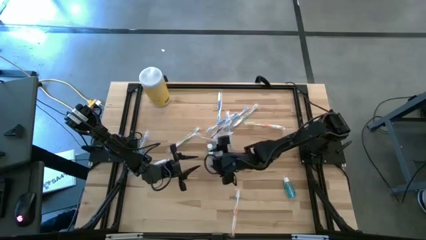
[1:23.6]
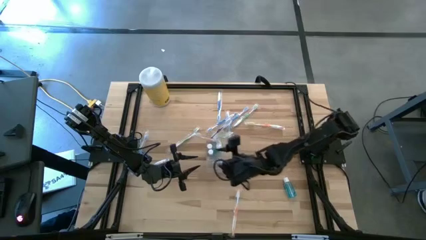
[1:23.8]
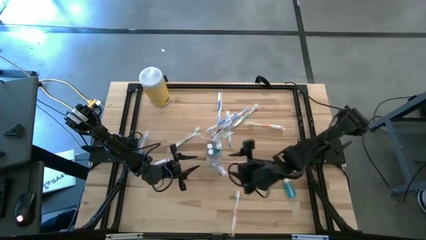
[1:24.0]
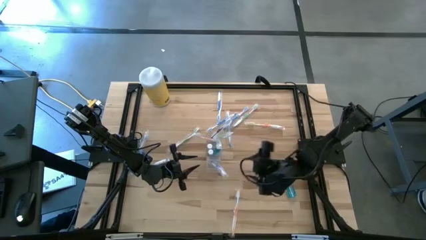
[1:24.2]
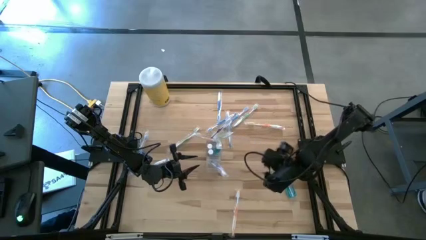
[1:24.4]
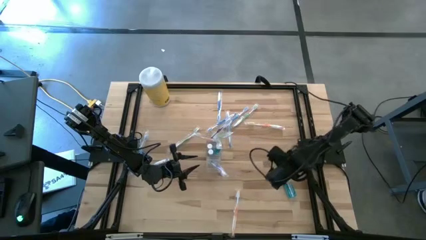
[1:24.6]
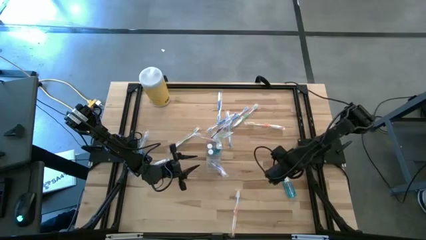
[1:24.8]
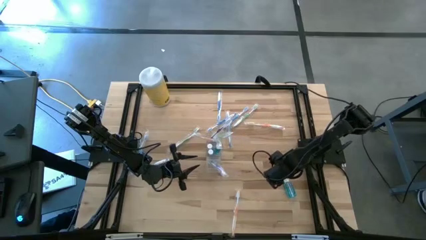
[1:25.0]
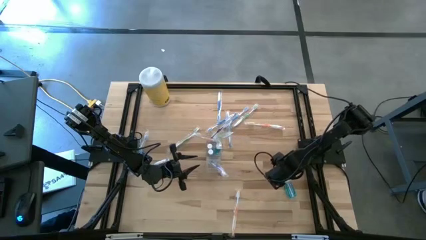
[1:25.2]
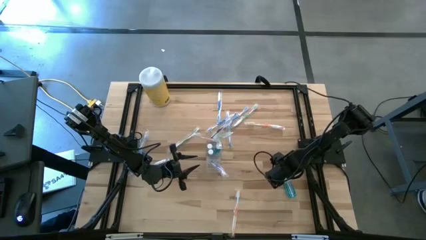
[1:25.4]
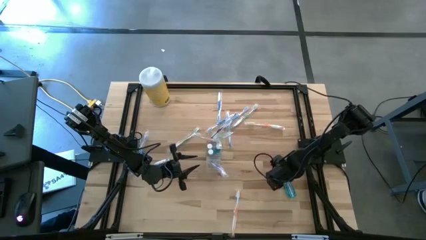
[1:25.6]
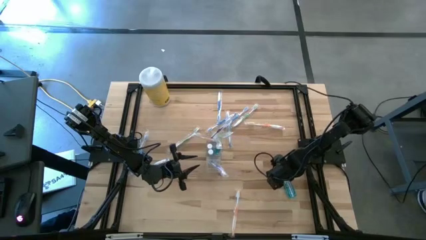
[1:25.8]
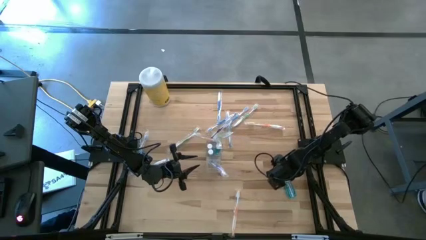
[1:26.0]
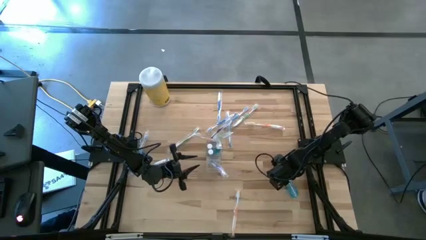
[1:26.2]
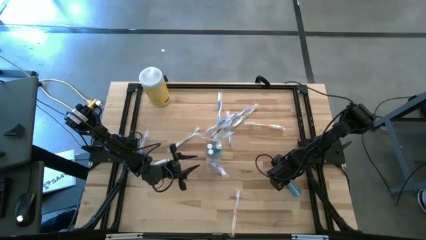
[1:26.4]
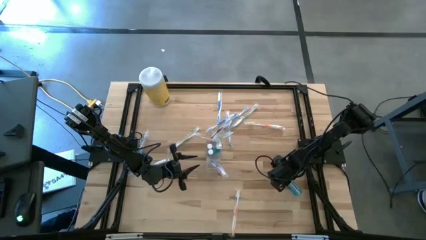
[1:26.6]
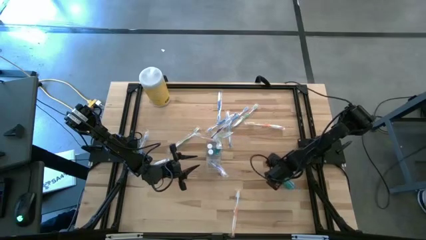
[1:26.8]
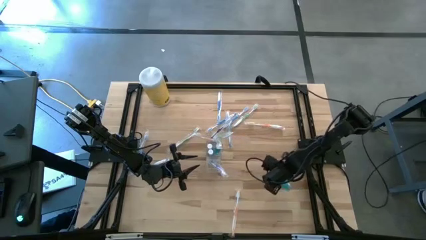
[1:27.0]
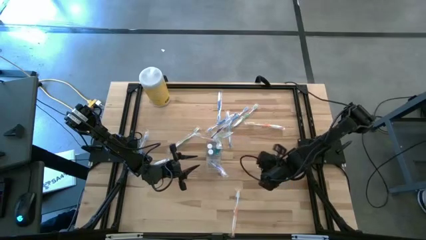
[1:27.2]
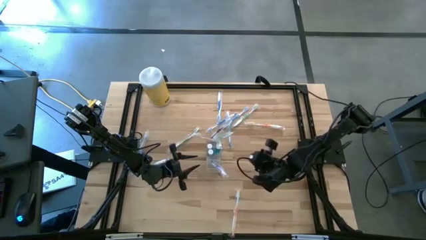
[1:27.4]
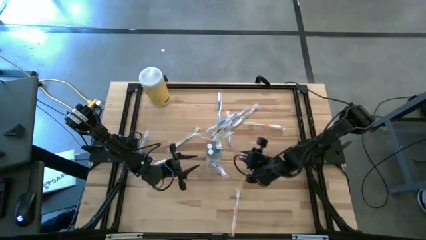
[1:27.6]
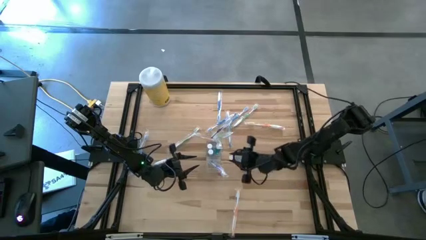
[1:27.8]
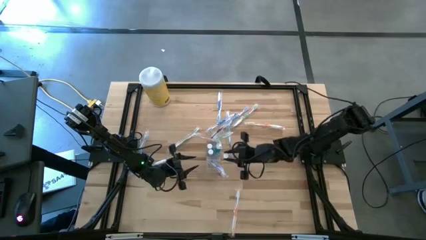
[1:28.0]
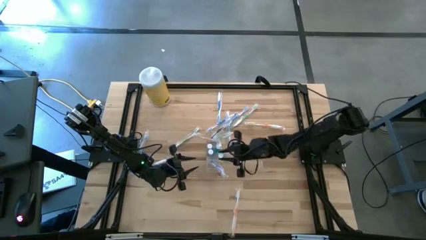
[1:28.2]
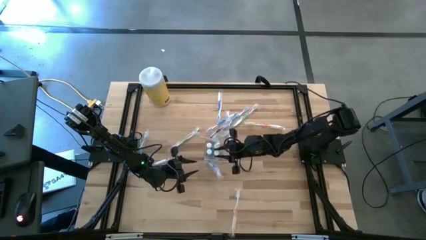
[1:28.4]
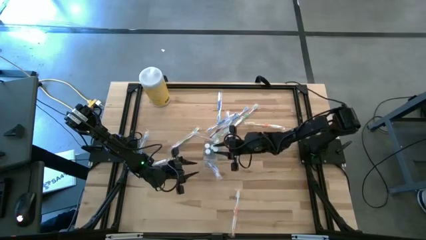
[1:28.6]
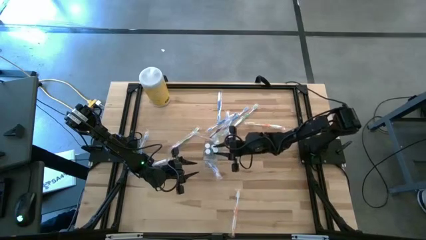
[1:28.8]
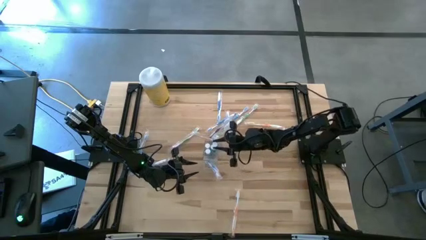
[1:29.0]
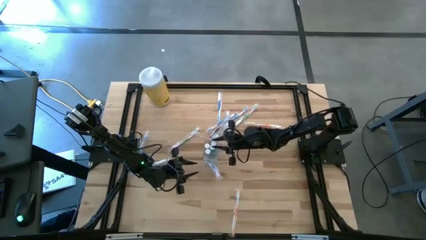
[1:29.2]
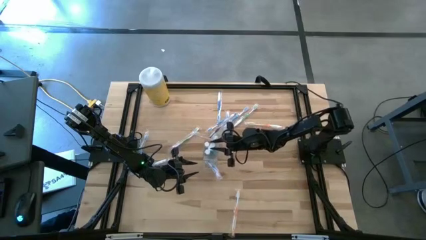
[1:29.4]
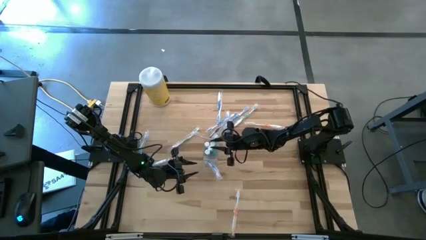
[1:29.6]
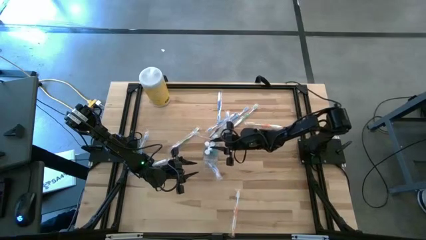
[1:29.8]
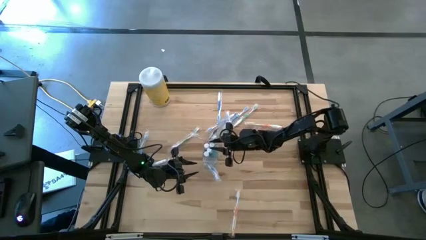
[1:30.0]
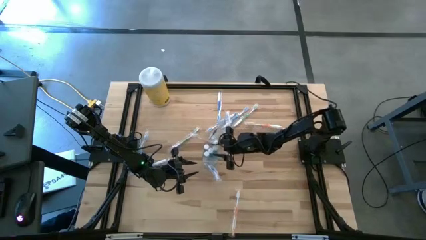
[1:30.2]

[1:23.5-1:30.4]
Task: Pick & Place toothbrushing station
Put the blue mouthwash into the transparent organizer

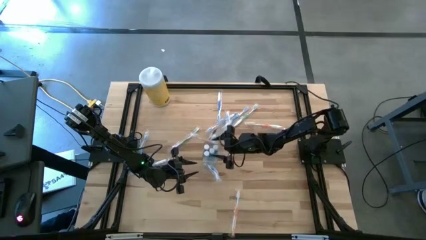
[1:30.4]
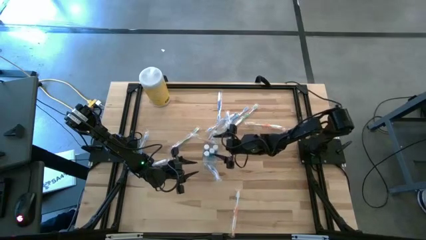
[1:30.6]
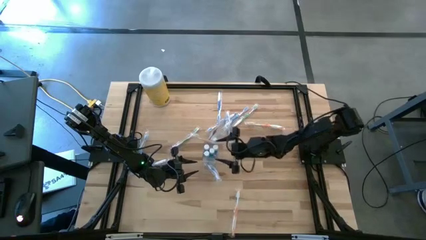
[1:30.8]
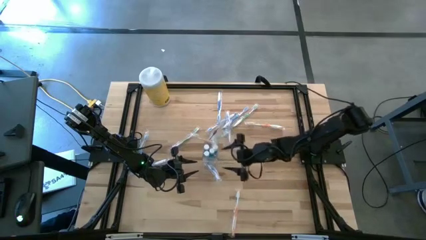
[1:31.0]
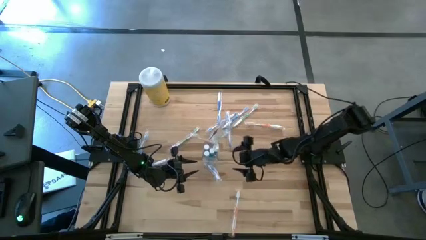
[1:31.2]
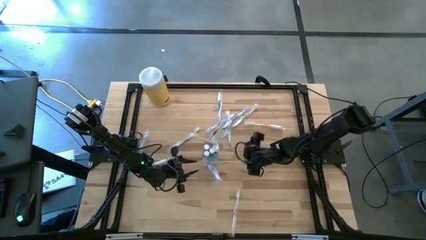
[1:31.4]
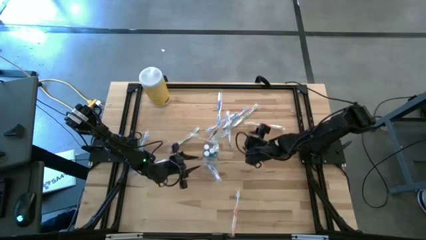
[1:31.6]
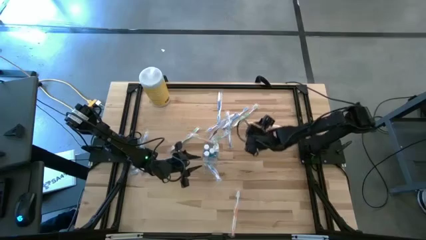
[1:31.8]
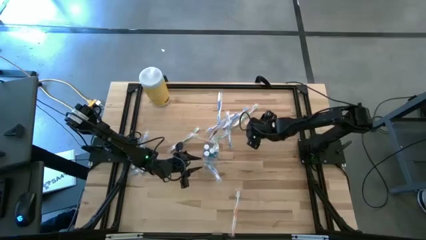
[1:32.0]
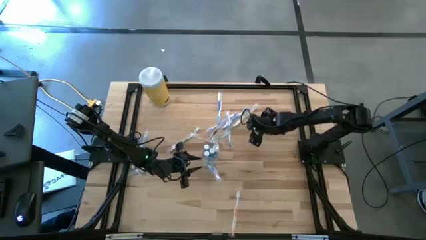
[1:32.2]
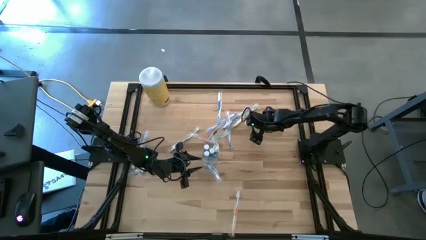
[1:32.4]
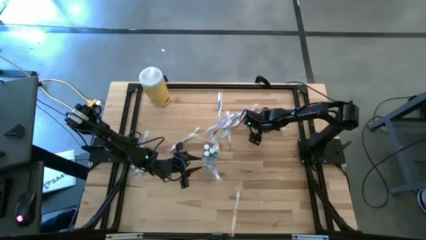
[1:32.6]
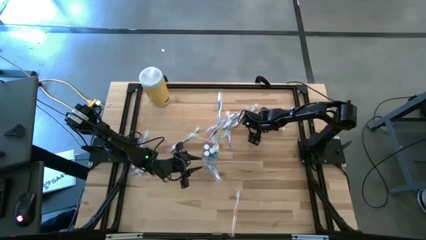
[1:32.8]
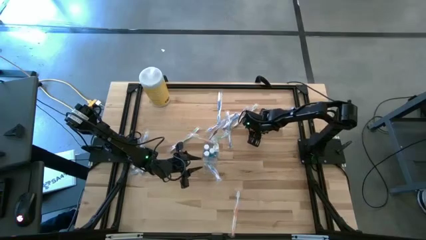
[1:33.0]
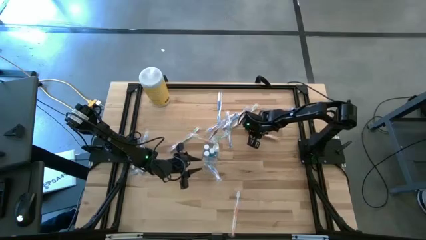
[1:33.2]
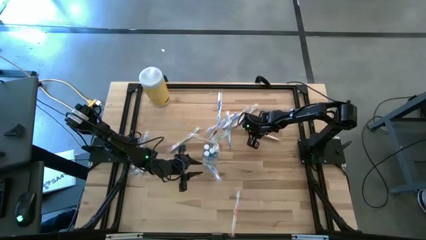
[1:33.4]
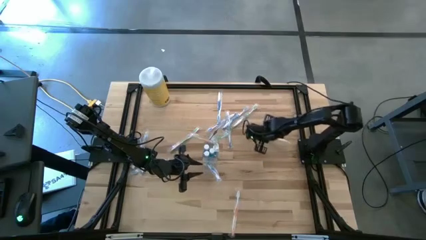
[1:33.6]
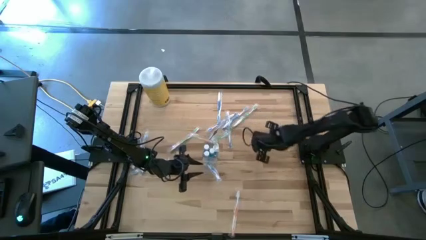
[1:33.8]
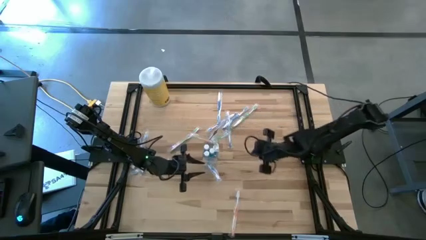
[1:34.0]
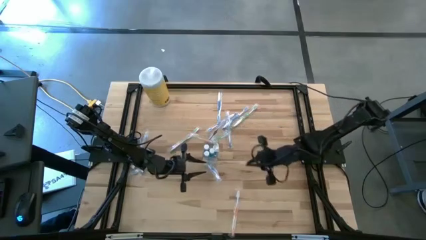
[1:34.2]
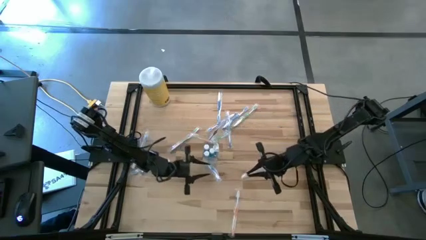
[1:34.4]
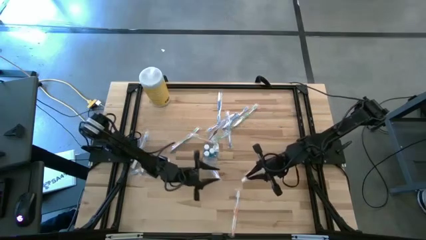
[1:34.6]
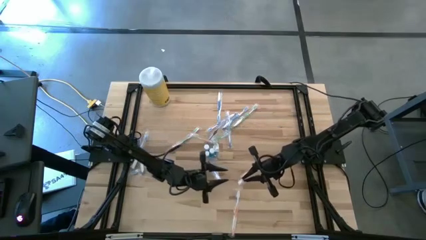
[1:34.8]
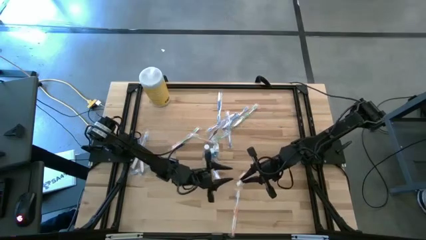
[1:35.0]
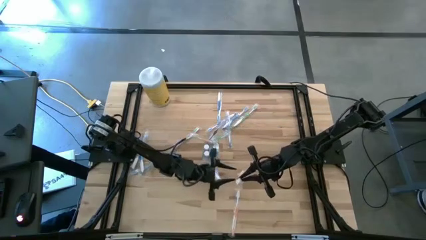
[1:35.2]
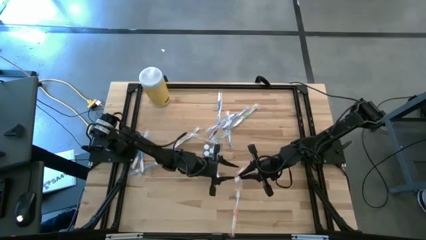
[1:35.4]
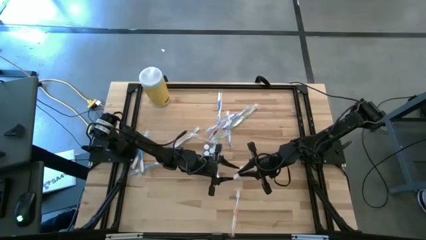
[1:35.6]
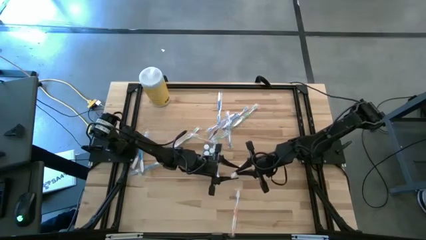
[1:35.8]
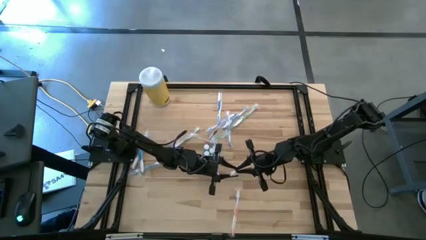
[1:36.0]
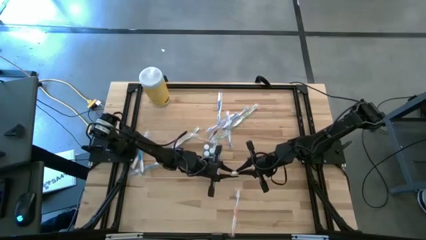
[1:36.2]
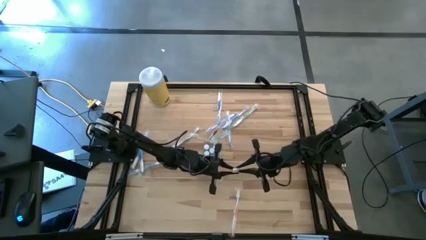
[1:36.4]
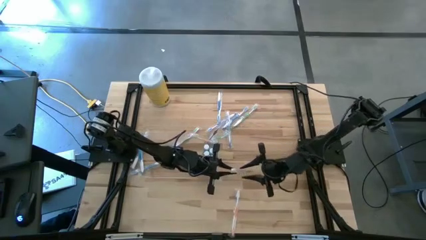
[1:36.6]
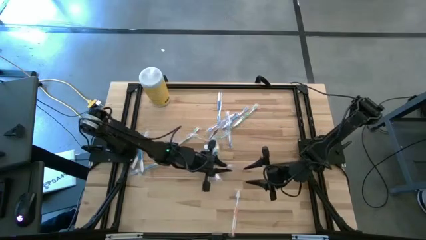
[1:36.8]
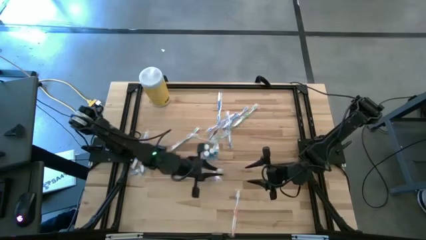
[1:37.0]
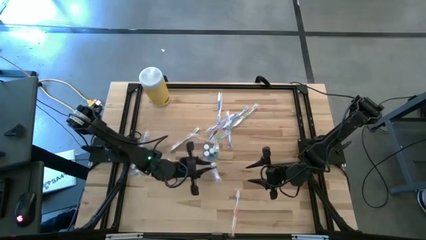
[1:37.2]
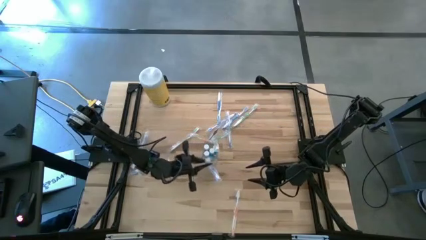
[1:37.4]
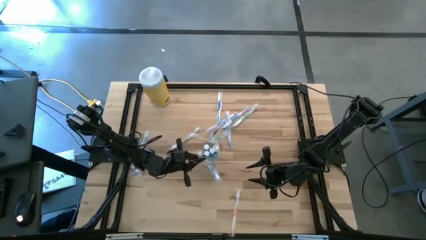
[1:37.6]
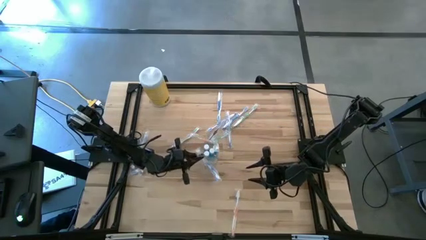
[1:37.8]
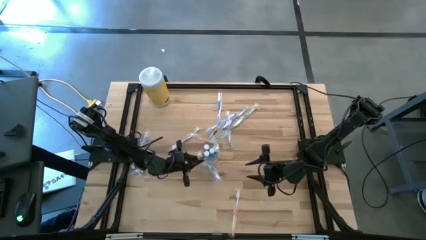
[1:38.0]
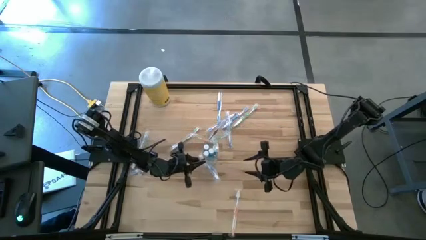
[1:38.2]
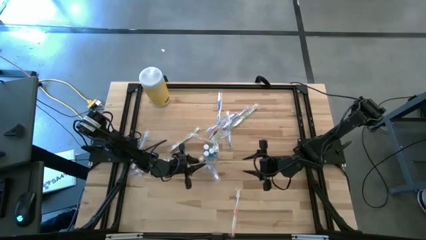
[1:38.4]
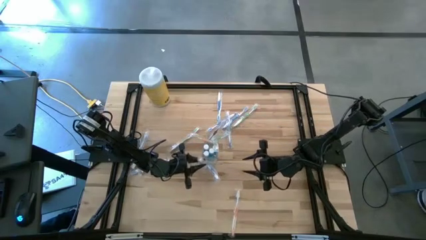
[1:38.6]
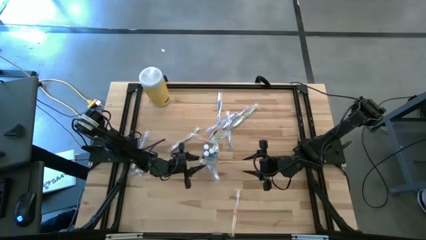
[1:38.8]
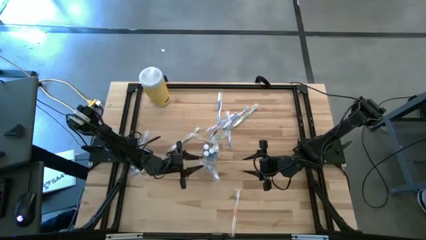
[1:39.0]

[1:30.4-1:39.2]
Put the orange toothbrush into the transparent organizer
